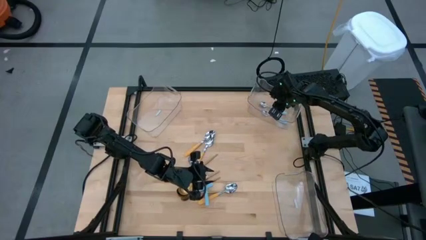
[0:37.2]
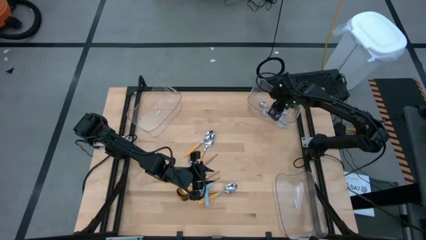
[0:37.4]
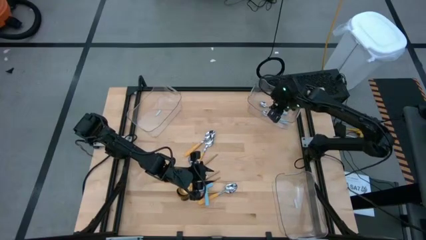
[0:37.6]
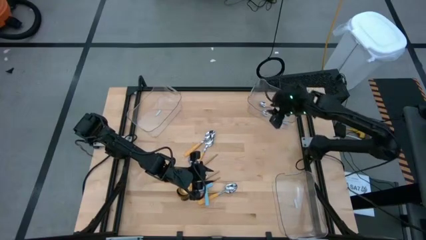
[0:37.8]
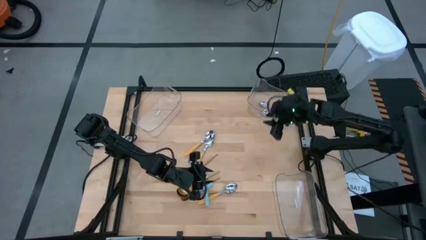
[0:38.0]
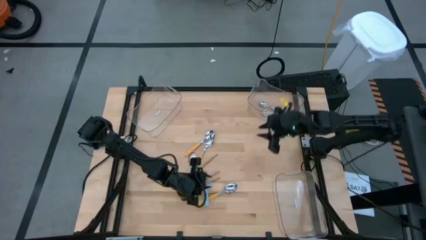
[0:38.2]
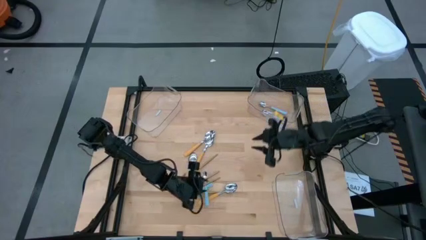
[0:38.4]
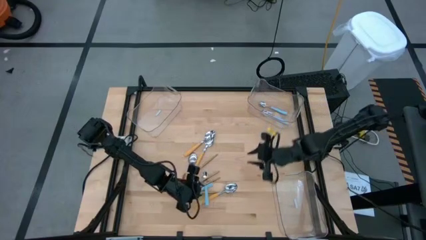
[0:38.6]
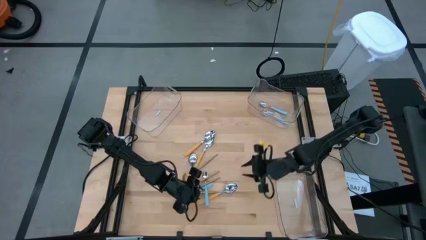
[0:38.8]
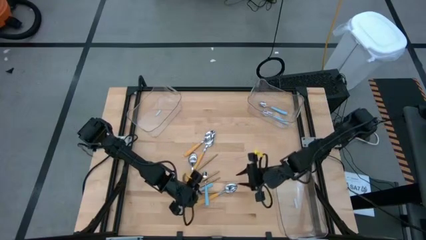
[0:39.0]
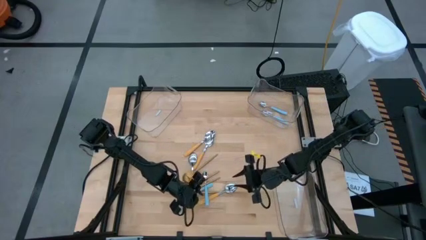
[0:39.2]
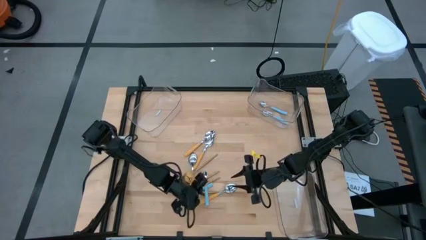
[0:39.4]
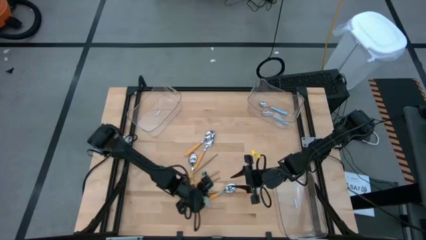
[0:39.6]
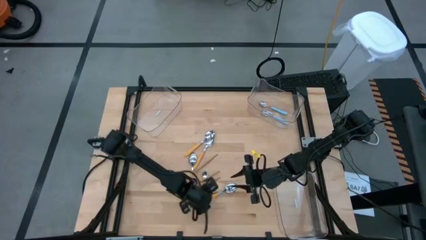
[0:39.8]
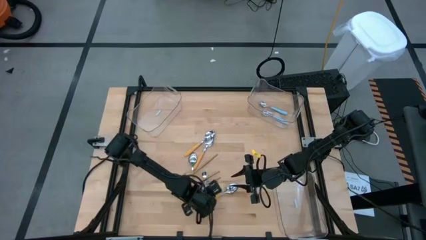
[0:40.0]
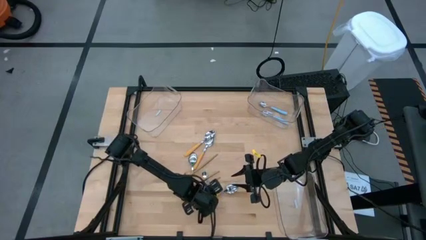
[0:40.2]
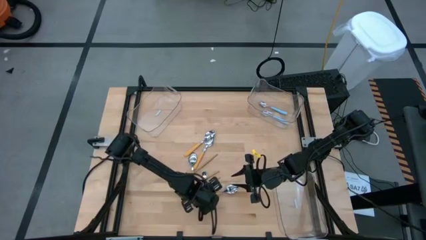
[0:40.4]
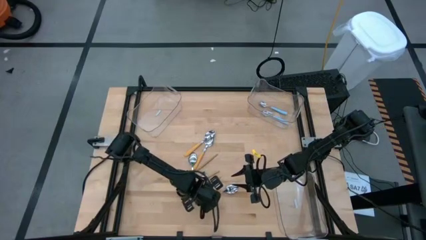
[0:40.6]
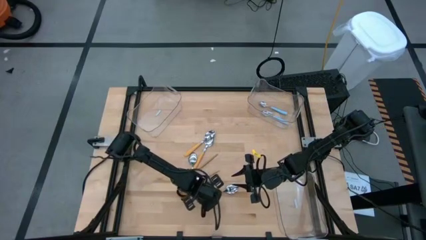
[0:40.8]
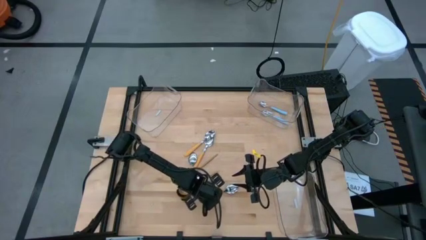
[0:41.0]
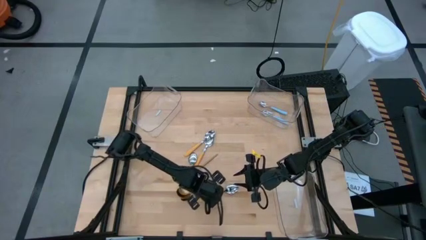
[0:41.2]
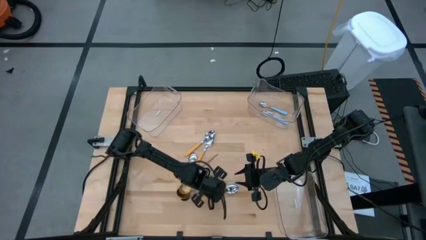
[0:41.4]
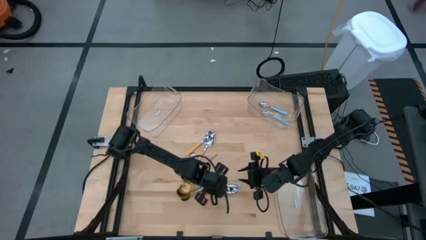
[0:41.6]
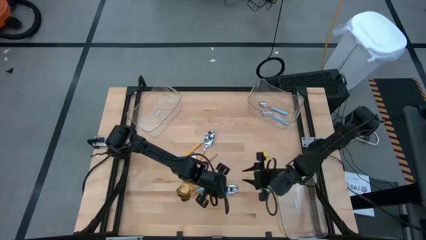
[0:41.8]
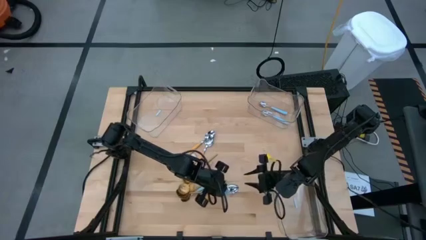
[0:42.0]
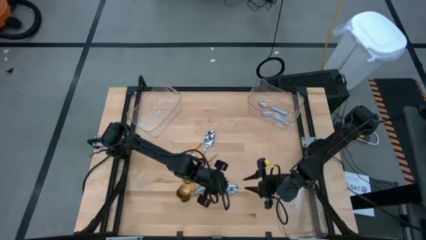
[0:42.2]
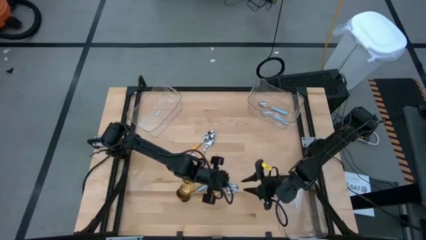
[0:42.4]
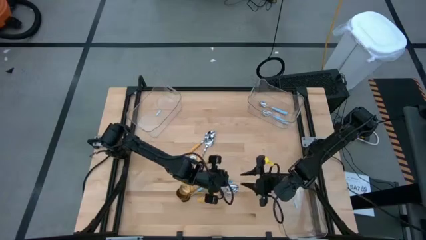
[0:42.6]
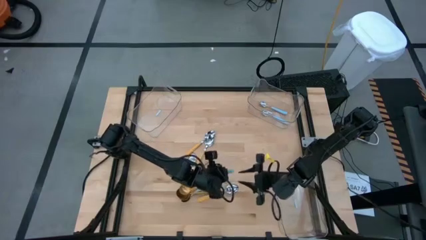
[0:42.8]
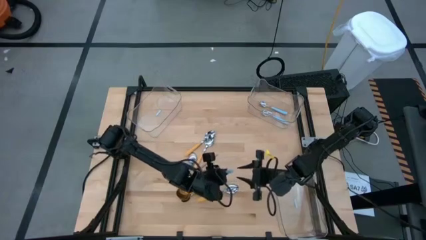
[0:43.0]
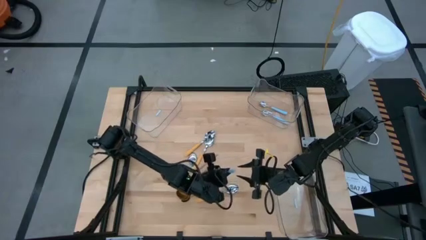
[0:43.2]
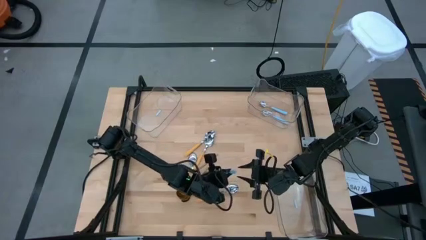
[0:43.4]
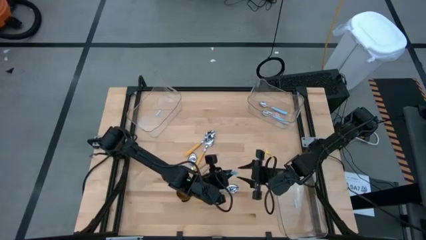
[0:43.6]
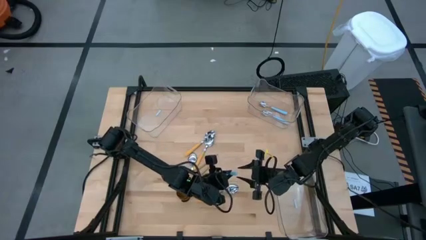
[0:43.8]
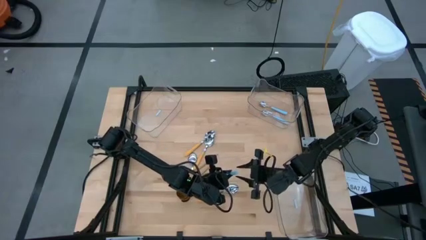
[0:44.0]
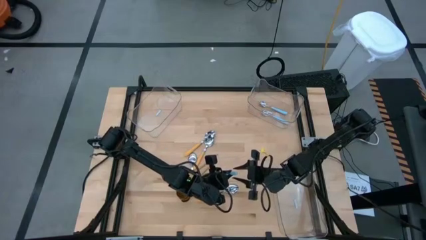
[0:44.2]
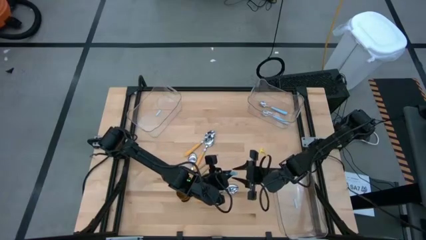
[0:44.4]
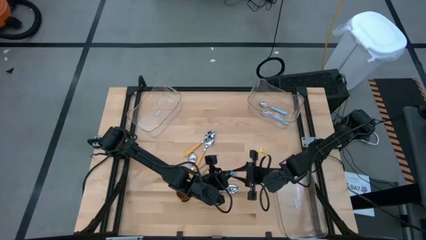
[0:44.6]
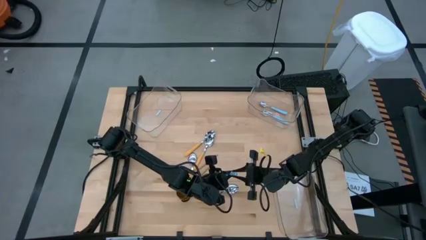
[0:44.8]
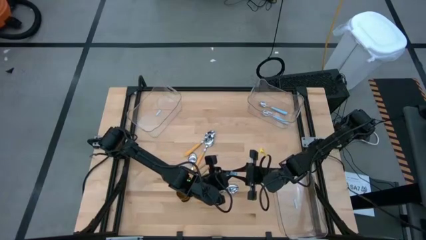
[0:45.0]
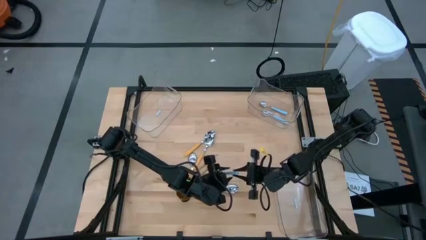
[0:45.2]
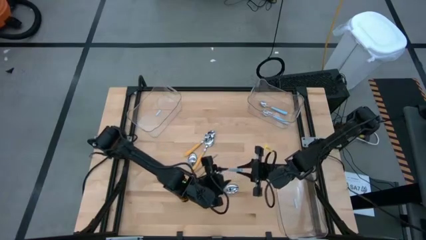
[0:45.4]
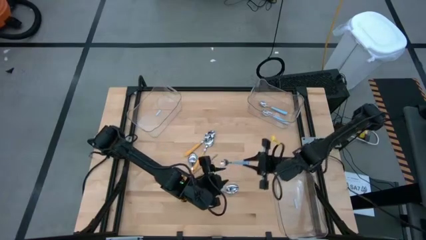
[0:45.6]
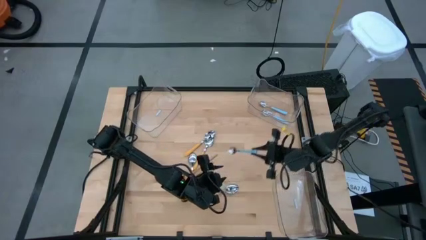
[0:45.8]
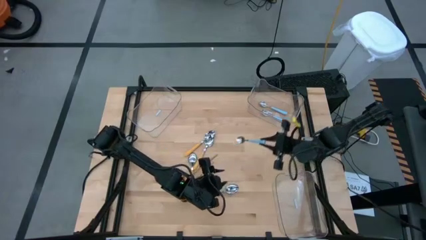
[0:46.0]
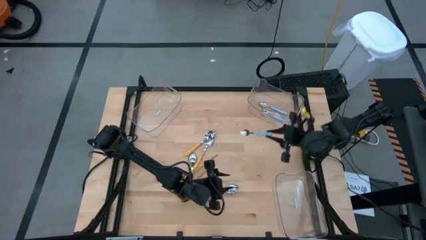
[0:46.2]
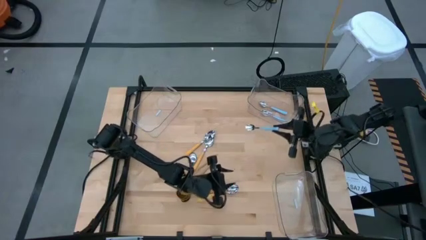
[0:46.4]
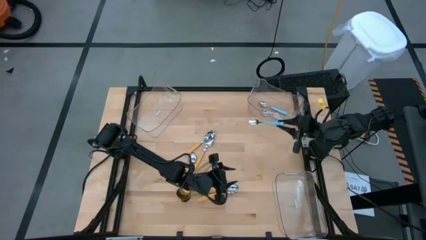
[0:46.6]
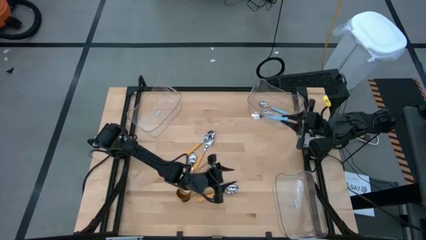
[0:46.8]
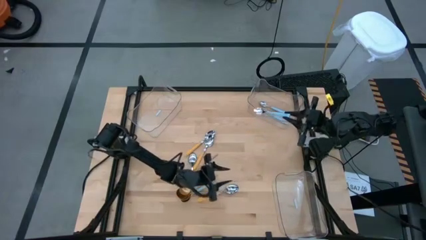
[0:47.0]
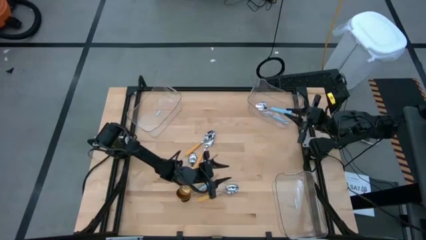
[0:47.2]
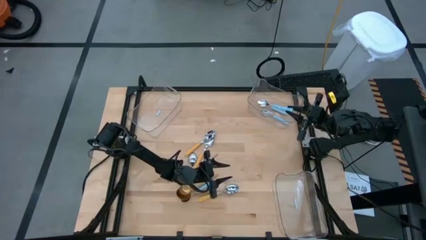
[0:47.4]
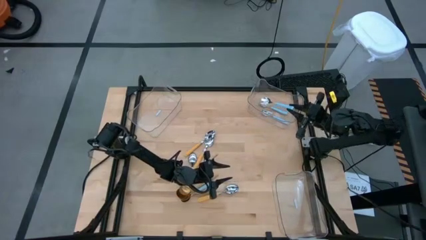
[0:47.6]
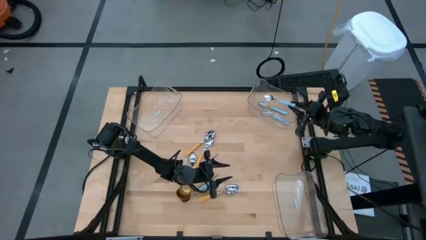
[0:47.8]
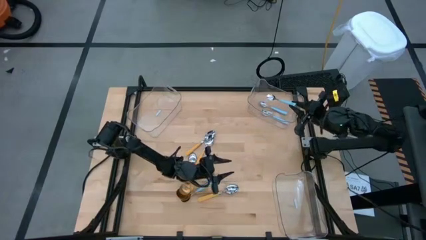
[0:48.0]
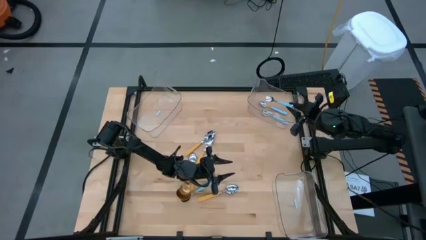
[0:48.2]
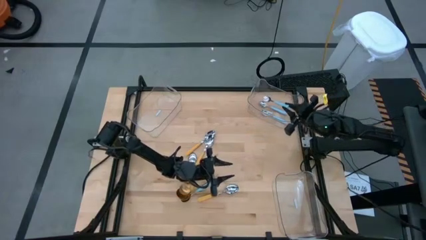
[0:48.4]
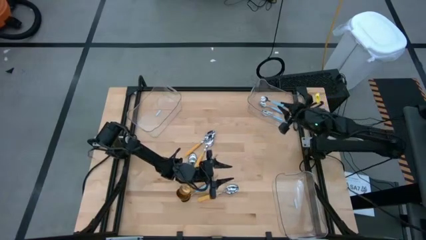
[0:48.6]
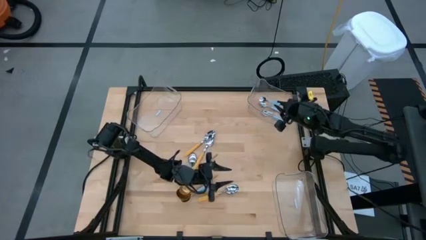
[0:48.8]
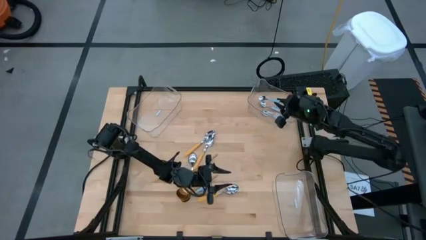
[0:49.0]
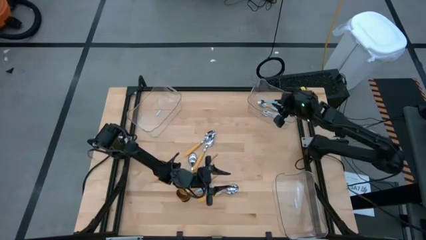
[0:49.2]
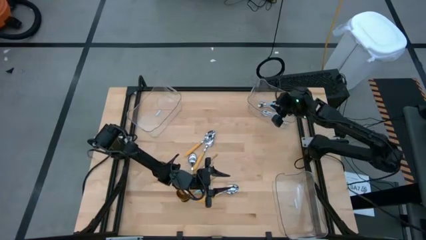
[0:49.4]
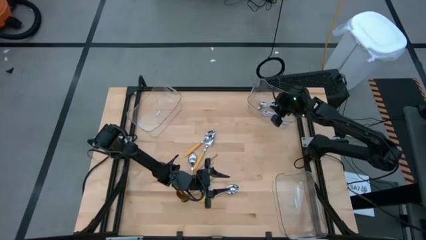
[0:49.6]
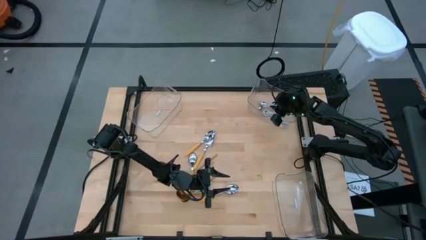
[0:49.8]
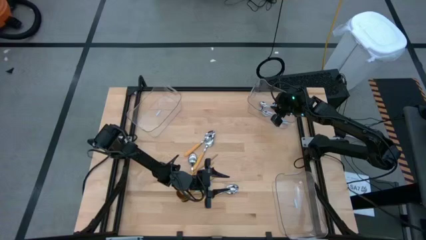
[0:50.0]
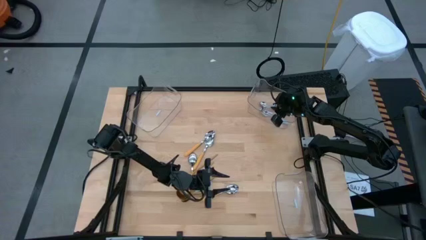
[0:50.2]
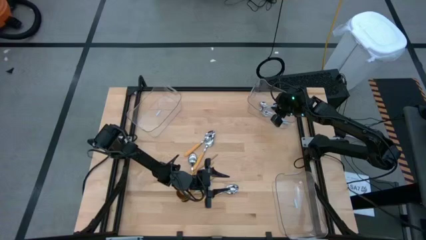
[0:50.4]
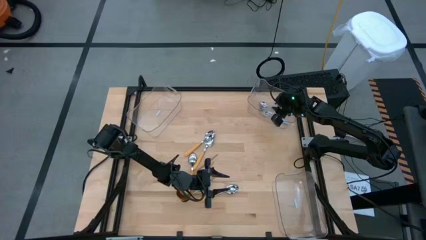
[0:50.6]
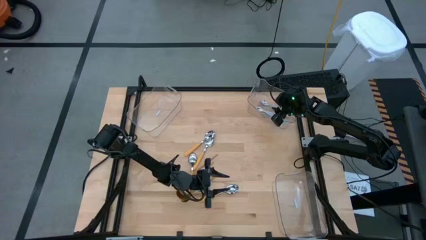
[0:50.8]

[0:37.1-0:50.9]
Task: Sort silverware by color (type)
Put the blue spoon into the top right transparent bin

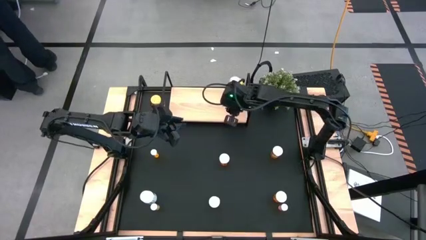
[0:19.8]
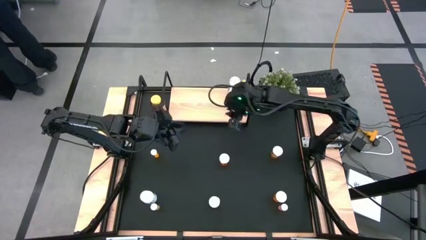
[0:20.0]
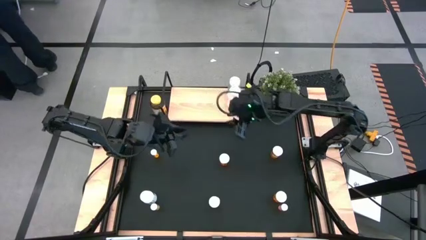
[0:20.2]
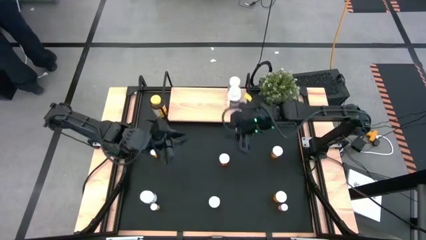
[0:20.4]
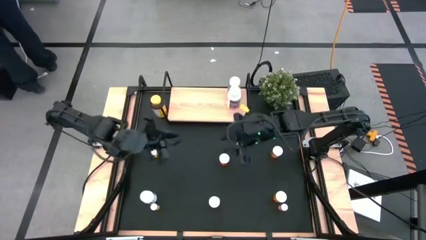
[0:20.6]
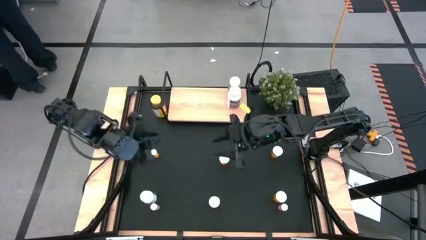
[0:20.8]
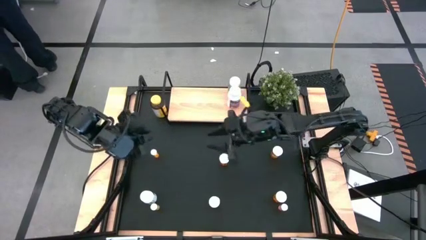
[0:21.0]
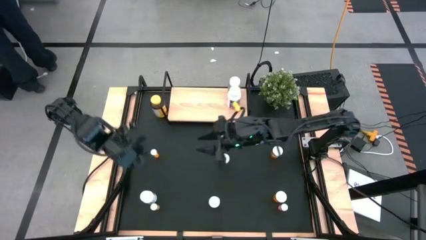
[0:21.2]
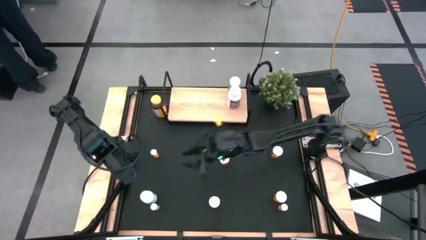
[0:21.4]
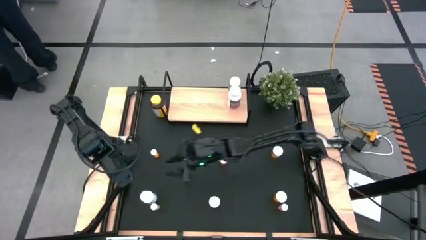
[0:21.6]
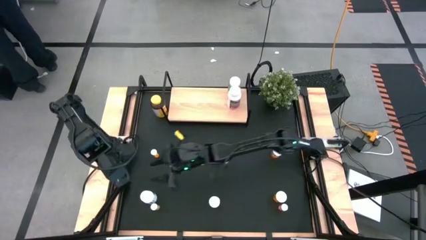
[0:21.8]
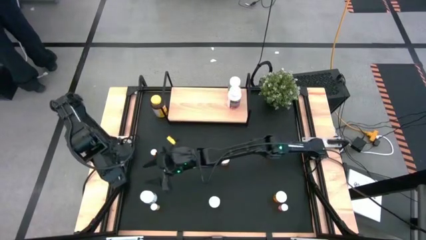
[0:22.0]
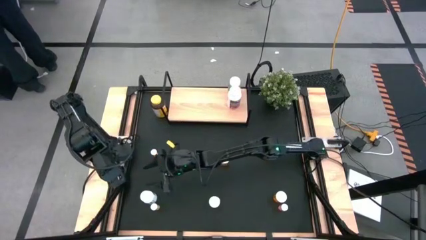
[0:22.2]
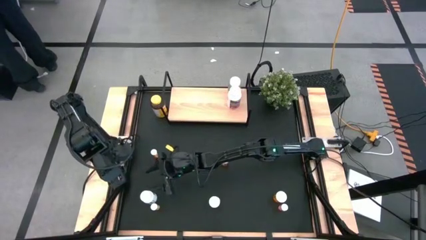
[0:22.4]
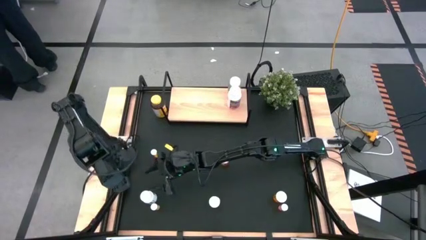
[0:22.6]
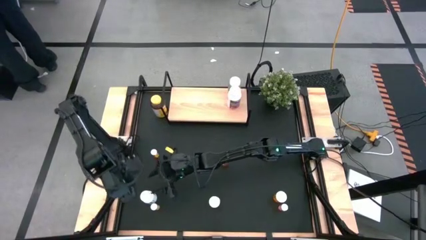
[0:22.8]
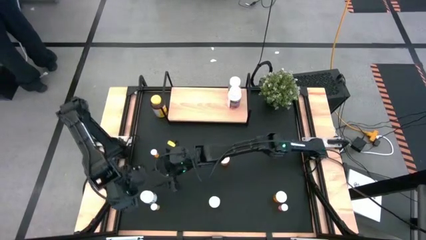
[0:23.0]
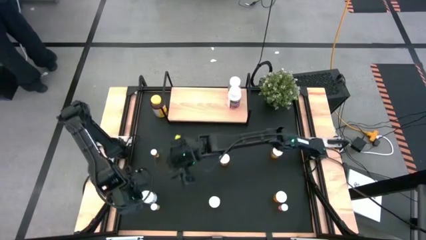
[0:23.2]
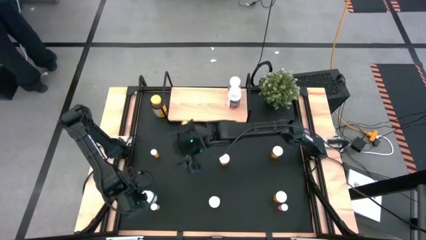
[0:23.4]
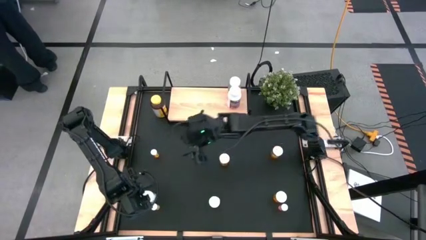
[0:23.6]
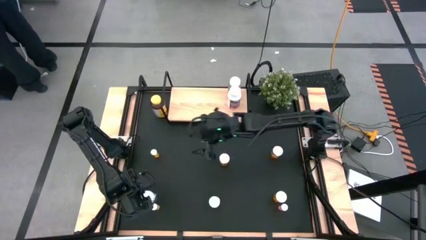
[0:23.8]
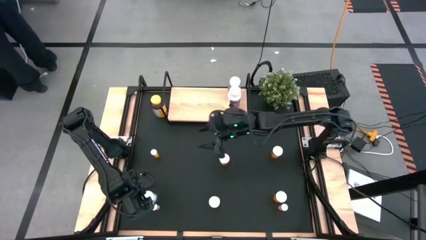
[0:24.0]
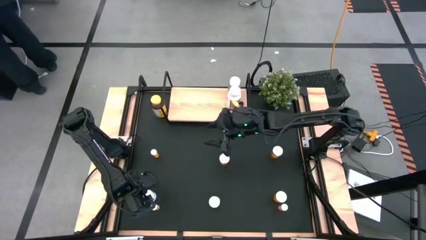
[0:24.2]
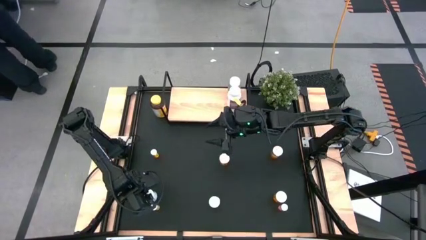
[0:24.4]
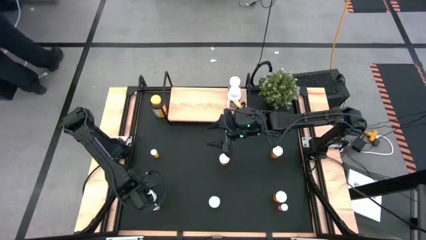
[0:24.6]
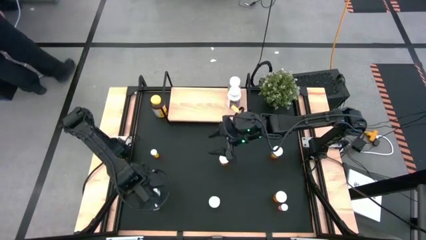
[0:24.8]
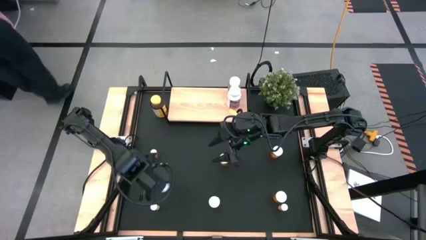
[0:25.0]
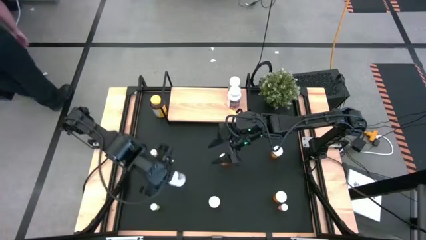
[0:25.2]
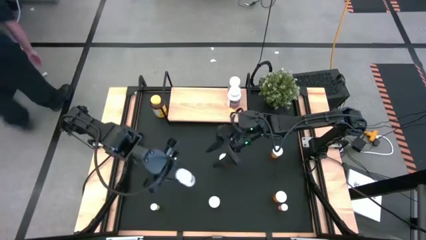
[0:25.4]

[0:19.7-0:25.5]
Task: Pick and place medicine bottles onto shelf by color
Put the white pill bottle on the shelf aligned with the other white pill bottles
